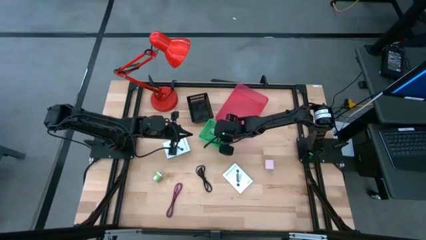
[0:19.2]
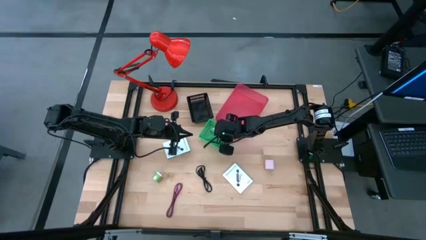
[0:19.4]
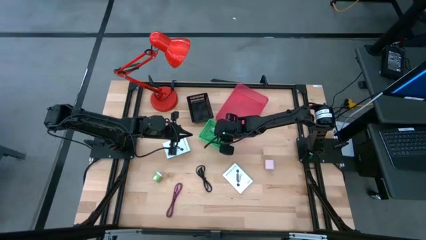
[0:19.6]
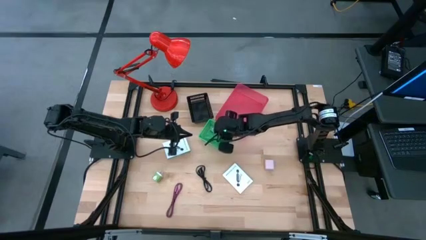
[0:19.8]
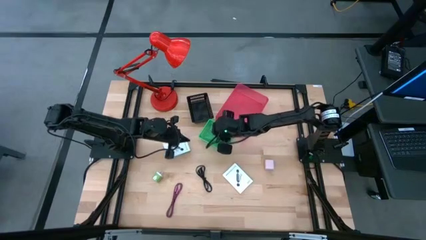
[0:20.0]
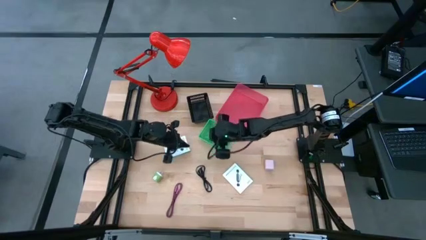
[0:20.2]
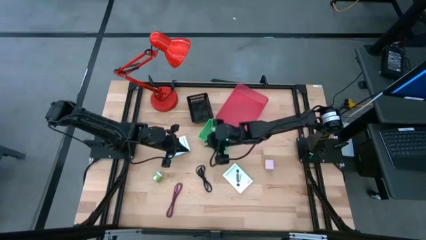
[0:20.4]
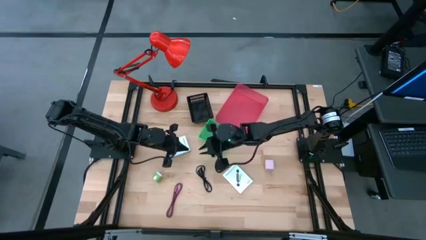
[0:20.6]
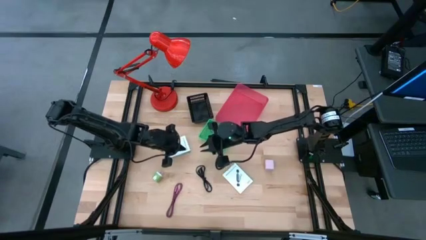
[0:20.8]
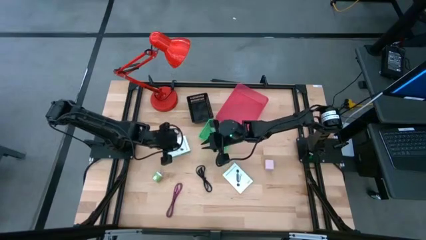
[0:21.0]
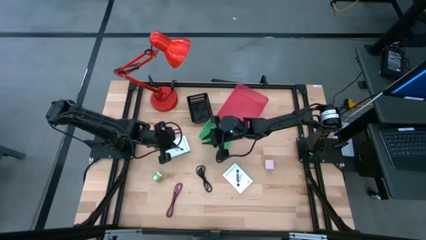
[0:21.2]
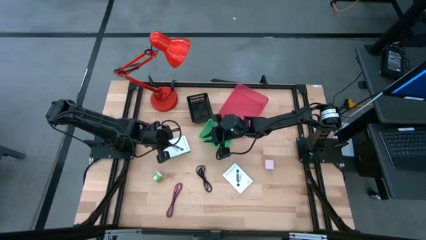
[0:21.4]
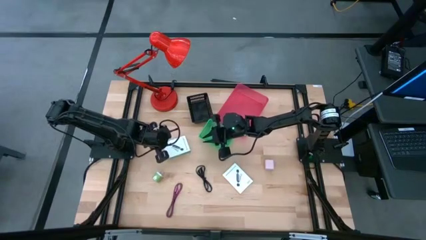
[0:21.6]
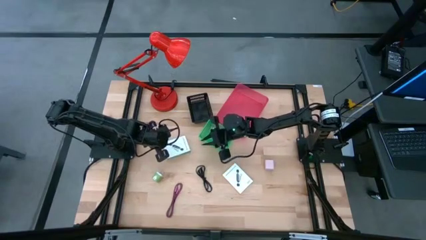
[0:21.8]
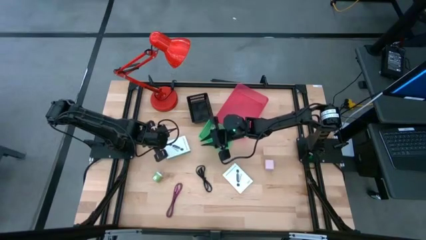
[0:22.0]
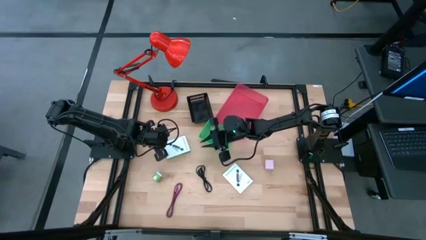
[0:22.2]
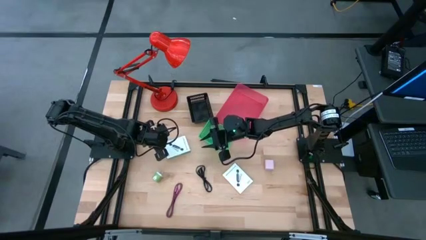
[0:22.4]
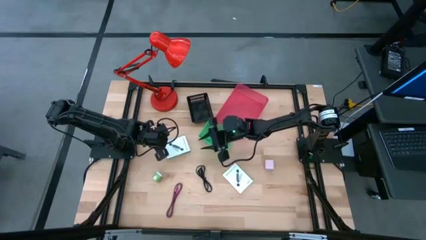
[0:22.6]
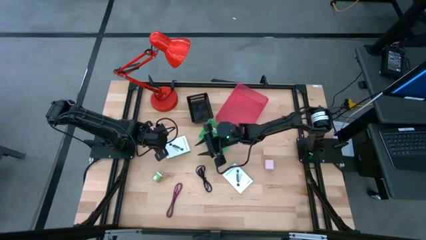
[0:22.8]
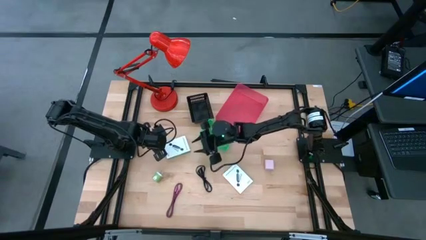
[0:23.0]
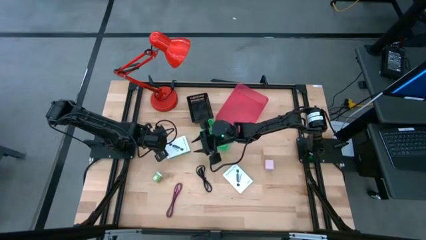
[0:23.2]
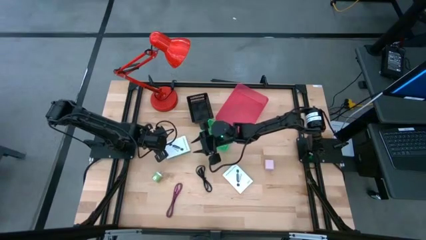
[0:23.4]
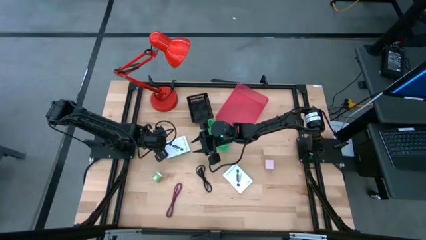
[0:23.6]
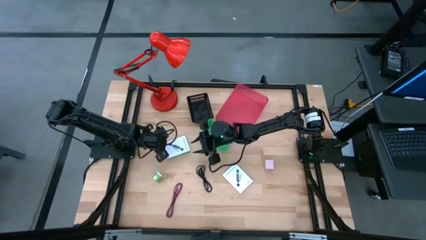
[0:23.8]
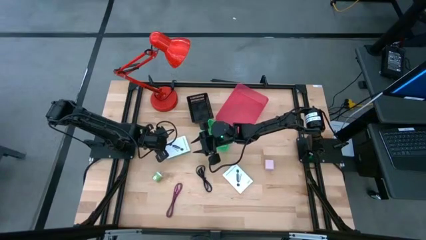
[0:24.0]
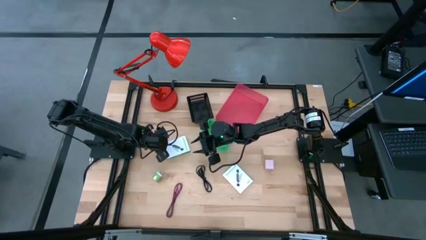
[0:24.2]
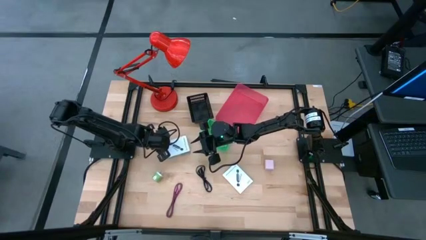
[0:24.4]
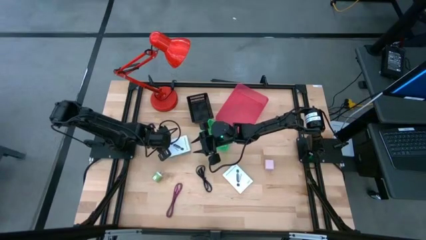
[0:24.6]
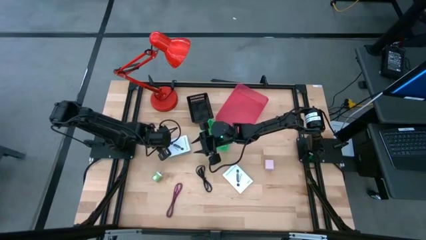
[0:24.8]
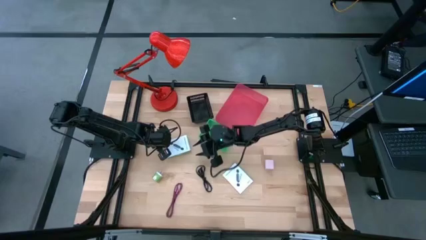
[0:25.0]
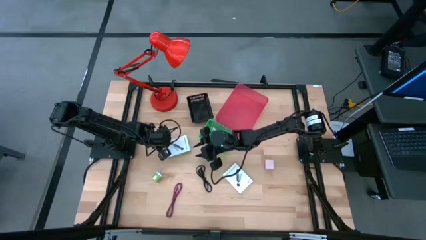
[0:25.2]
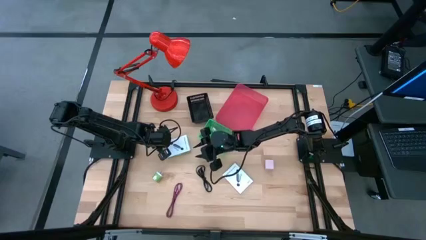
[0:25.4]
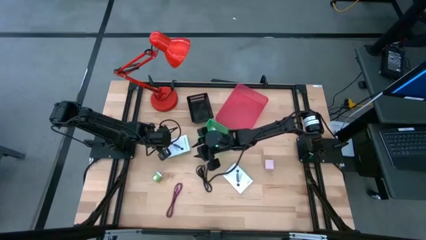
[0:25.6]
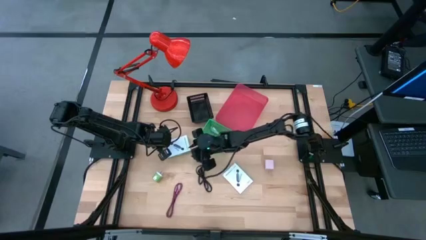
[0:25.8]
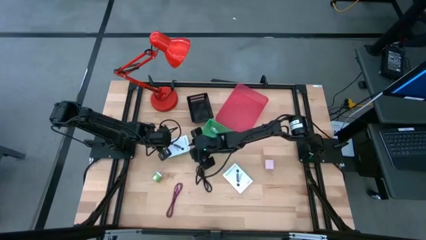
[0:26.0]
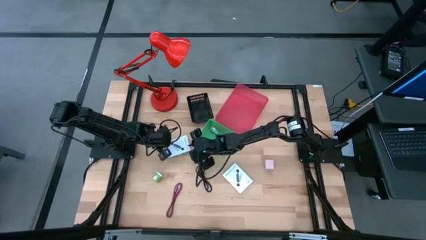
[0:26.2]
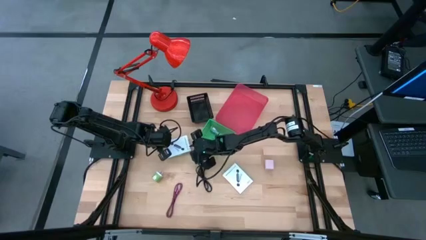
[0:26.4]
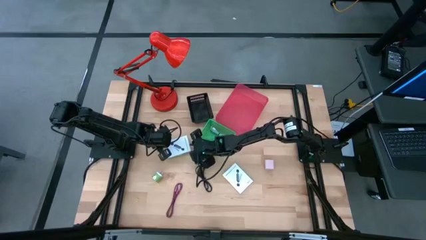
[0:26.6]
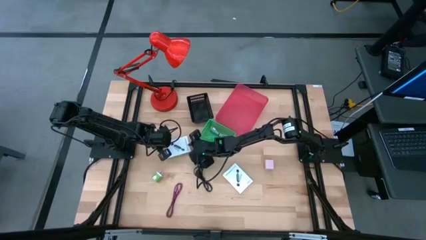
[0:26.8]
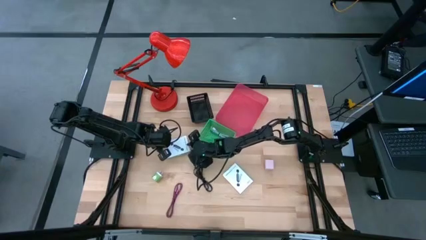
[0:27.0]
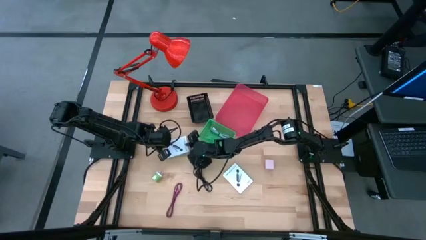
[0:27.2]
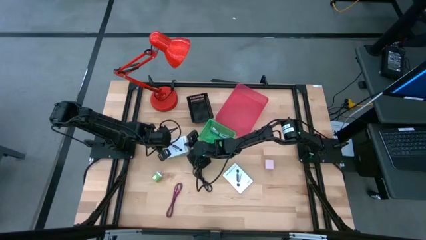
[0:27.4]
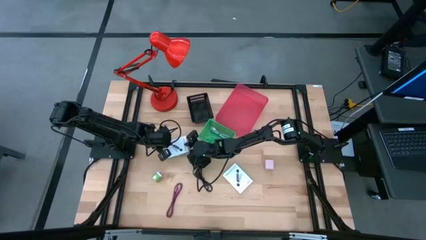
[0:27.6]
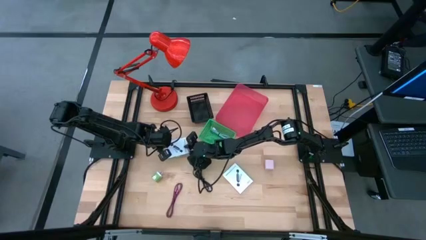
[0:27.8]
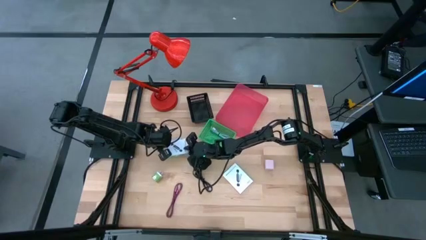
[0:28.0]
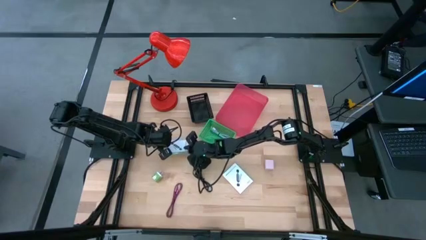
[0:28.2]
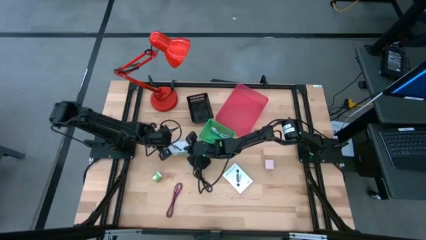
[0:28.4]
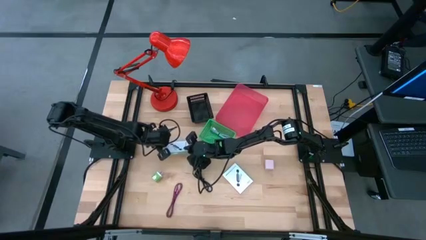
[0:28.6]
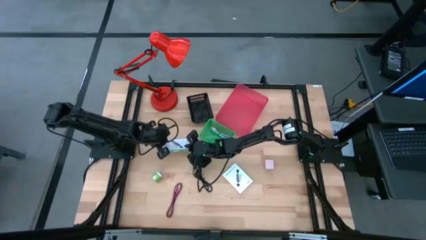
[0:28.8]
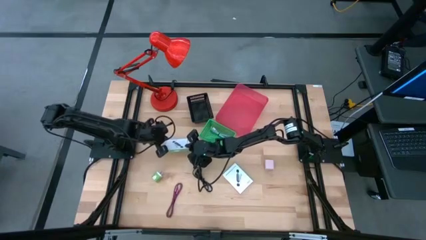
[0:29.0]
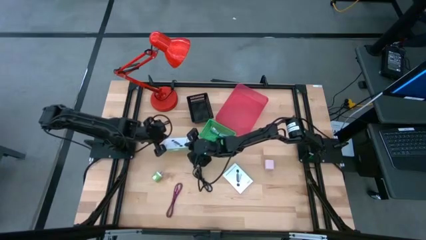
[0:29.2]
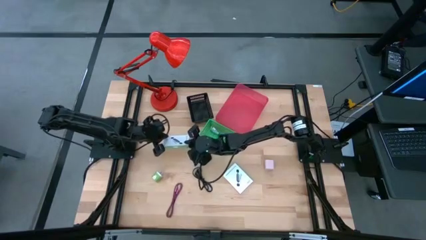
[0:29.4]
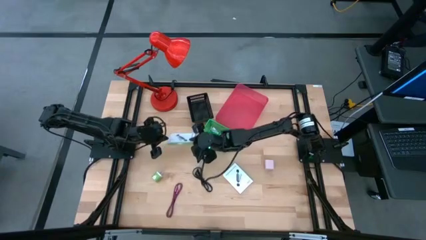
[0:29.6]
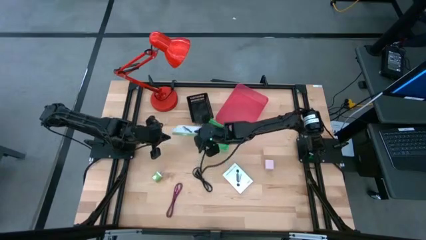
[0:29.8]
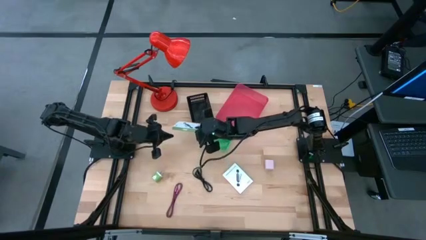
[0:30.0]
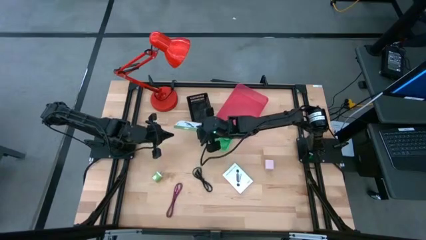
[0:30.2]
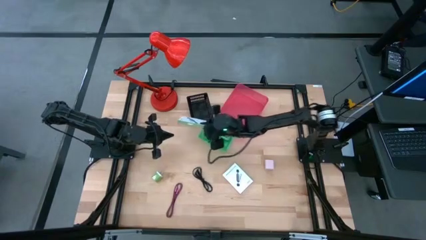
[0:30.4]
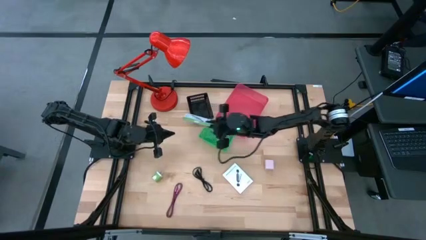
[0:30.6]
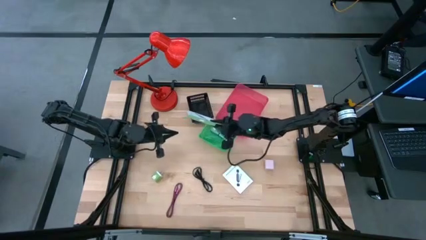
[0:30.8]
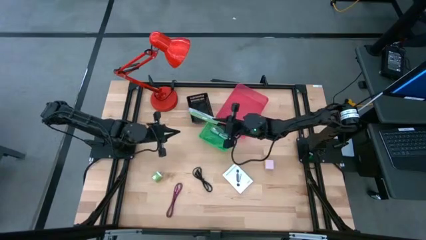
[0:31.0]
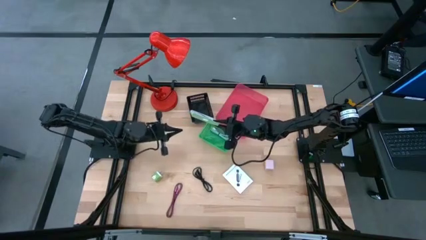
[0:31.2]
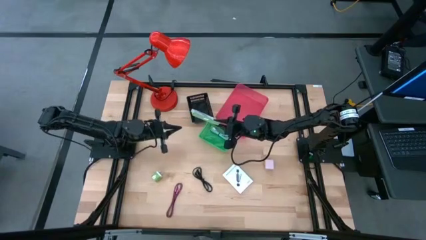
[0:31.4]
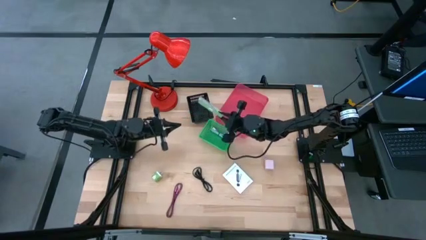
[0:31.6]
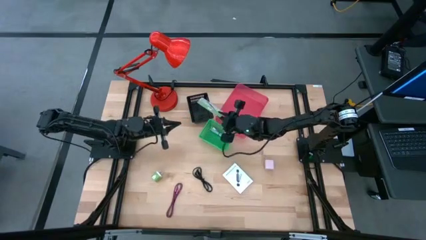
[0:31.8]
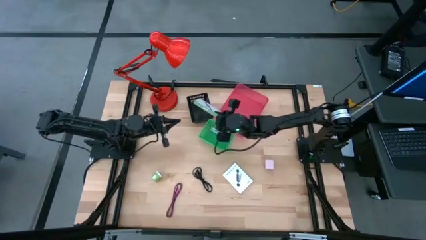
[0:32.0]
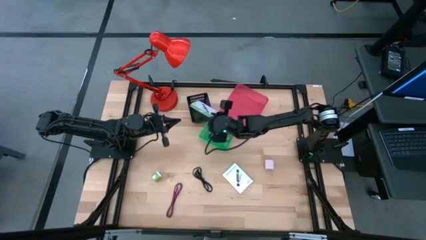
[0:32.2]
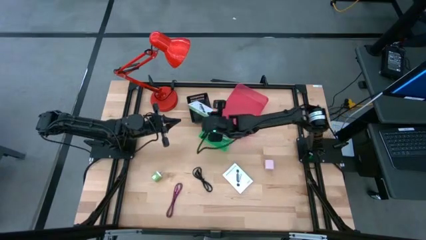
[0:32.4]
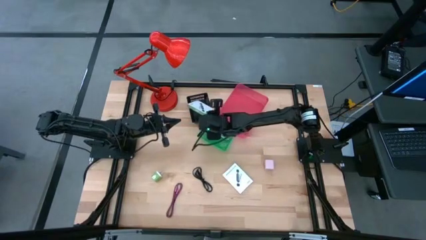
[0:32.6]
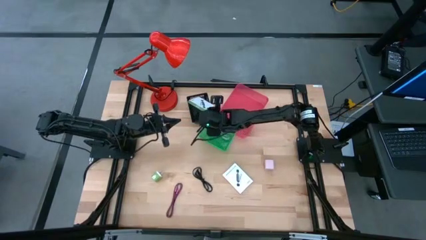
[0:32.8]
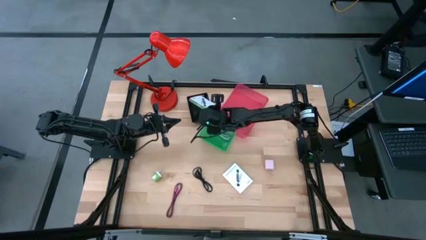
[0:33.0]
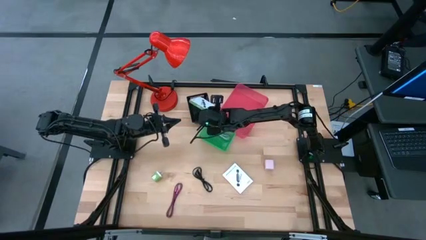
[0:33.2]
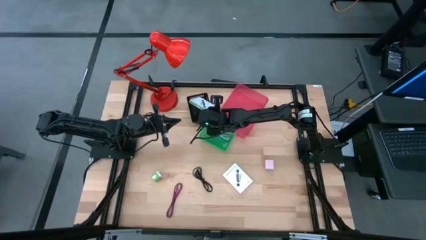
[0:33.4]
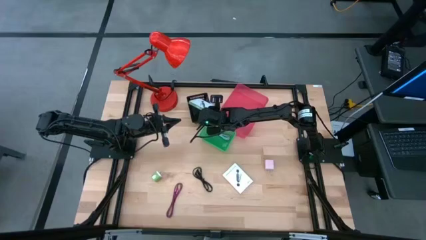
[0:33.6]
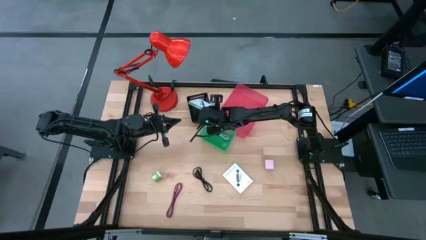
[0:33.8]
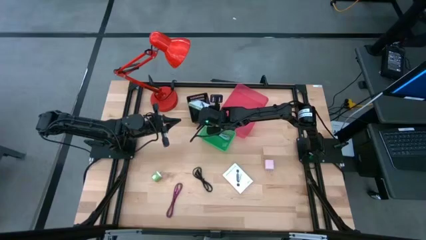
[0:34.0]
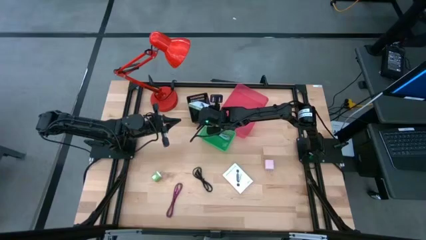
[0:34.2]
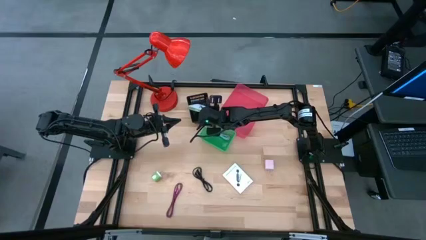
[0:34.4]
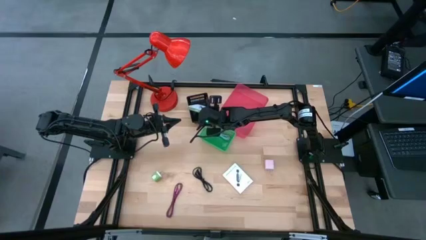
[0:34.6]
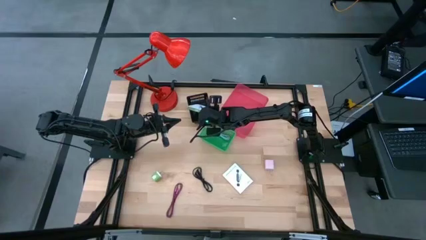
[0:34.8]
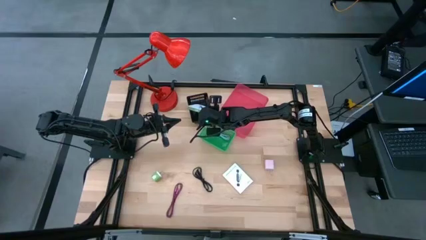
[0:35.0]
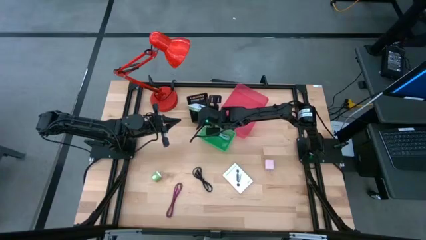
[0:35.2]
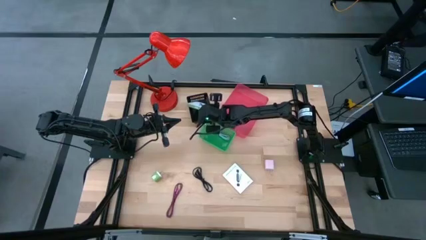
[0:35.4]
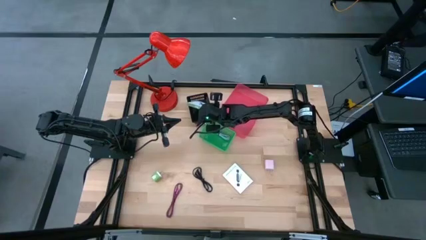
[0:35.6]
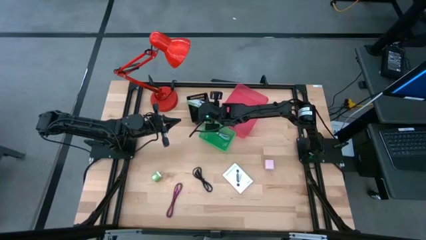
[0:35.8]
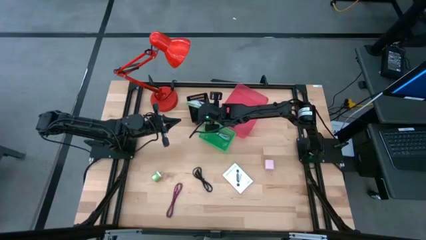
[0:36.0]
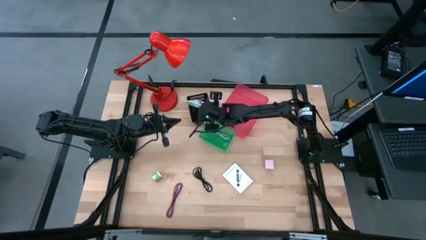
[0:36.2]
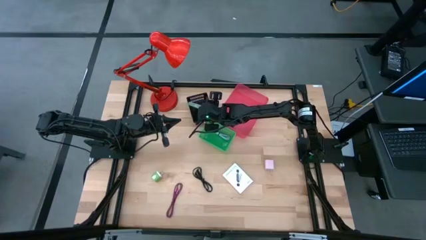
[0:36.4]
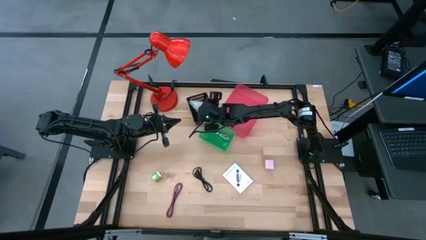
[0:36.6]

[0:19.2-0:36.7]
Task: Pick and place items into bin
Put the left card reader box into the black bin
